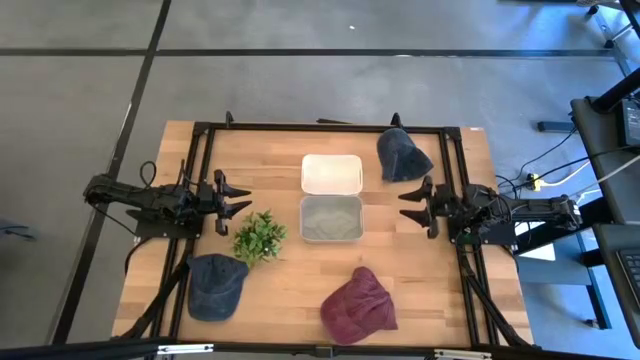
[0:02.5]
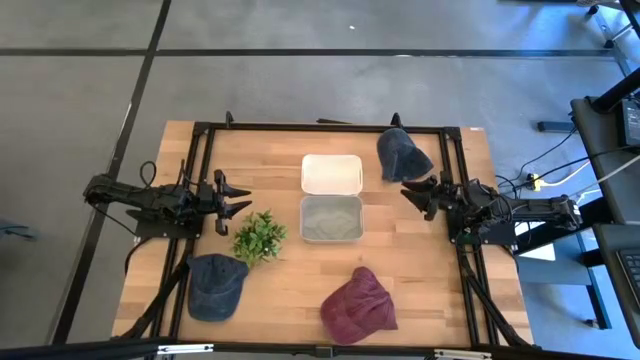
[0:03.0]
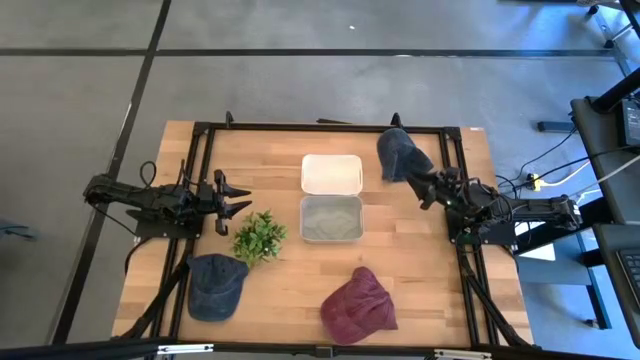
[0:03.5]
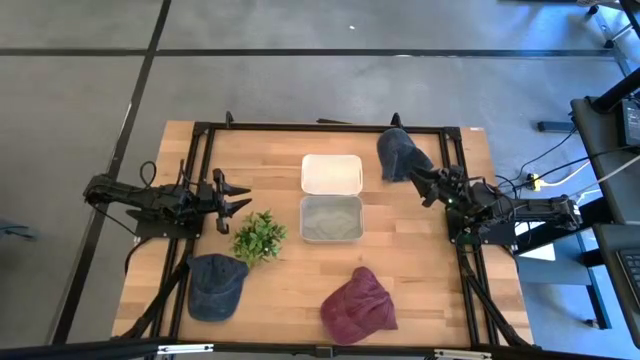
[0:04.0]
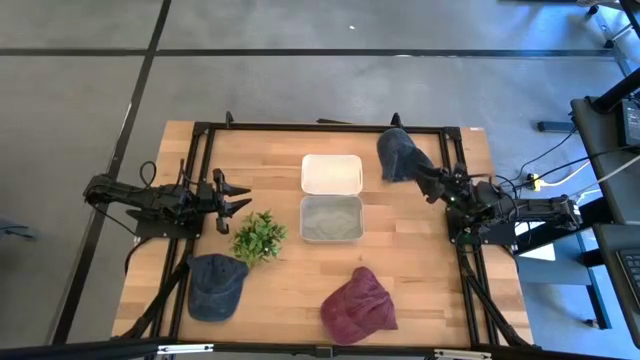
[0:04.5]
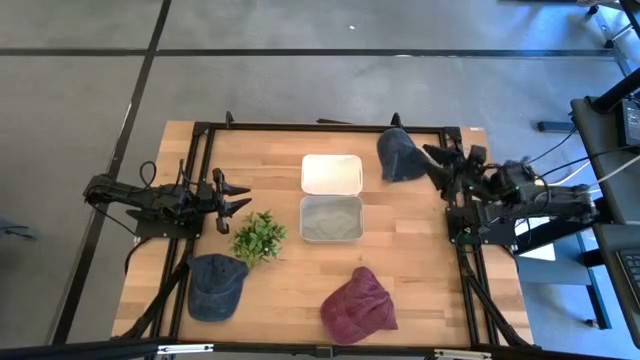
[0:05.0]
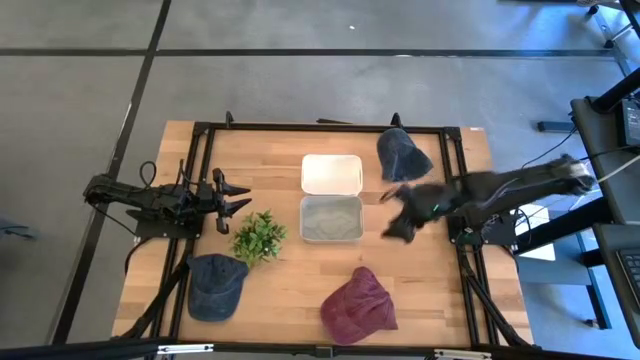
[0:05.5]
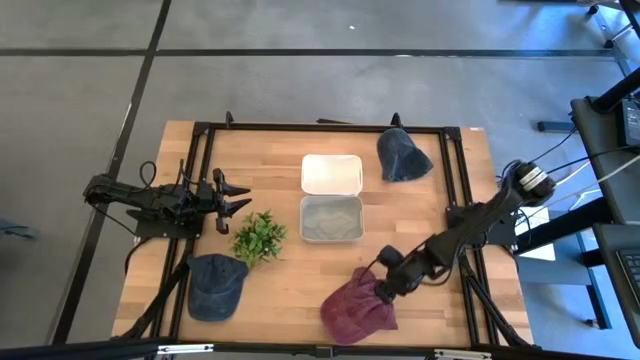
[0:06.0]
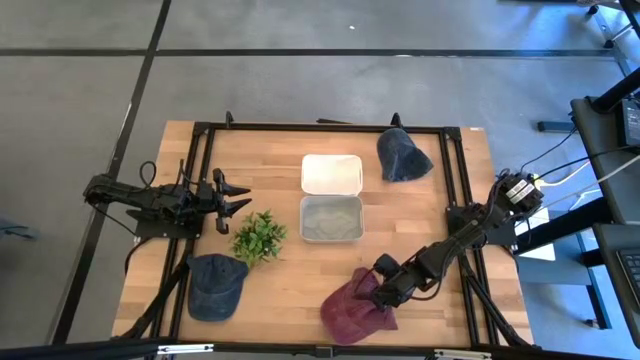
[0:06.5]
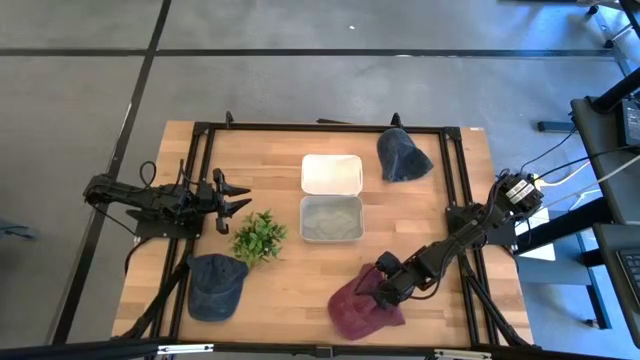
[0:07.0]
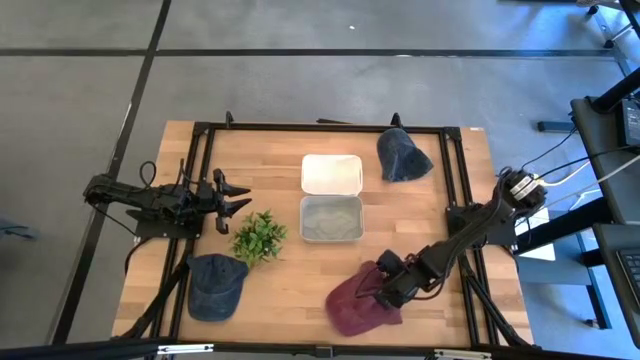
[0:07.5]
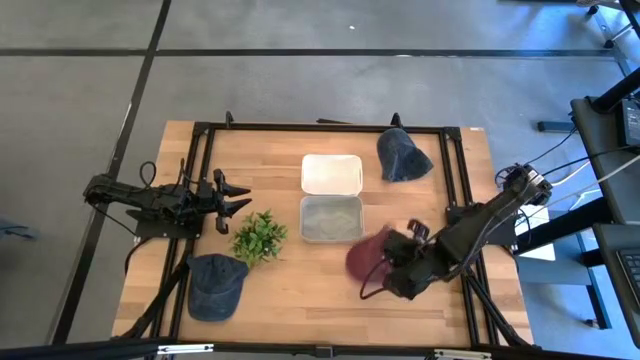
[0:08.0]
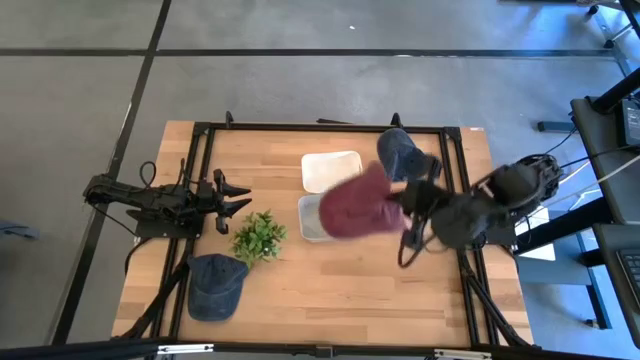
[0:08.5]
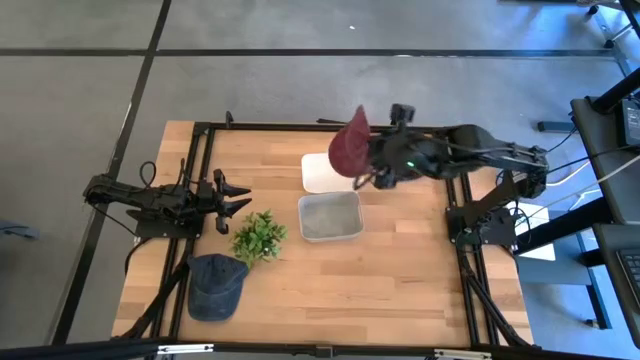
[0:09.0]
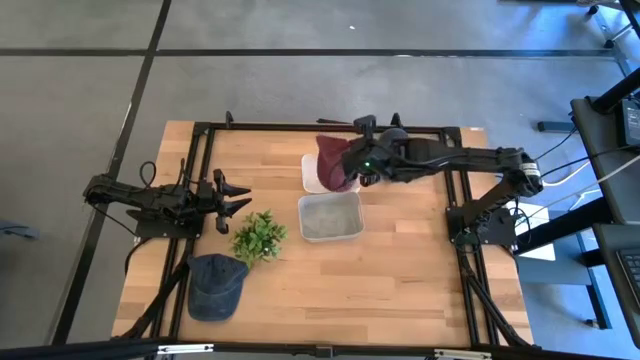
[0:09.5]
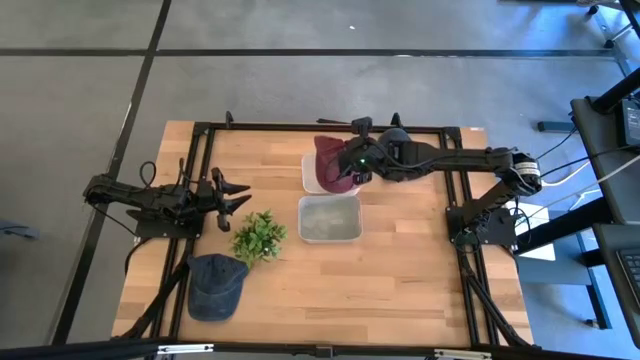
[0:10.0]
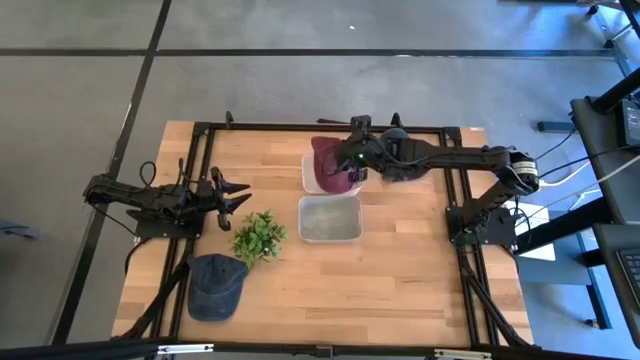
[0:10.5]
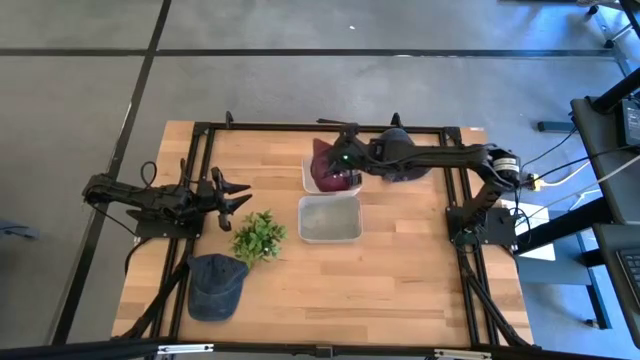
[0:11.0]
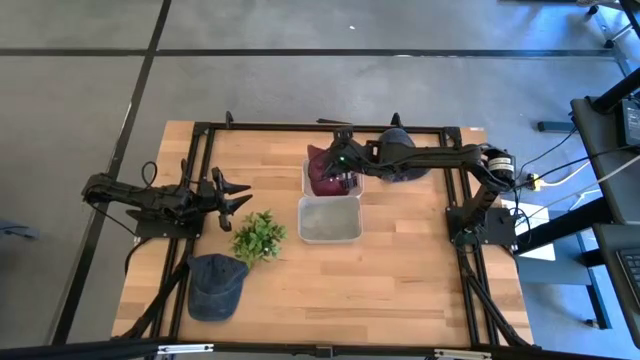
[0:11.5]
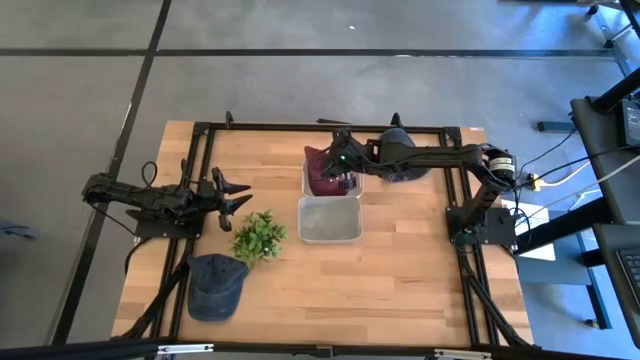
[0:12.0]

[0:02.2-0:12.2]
Task: Pick & Place hat
Put the red cap into the white bin

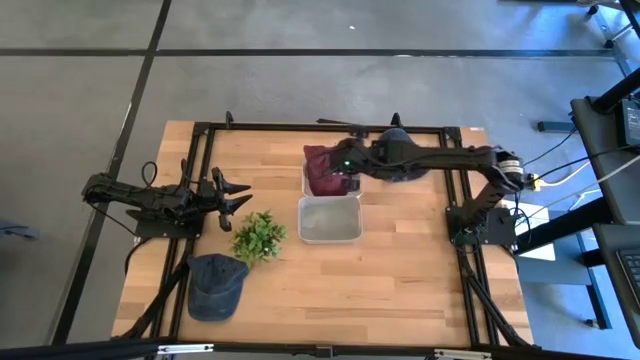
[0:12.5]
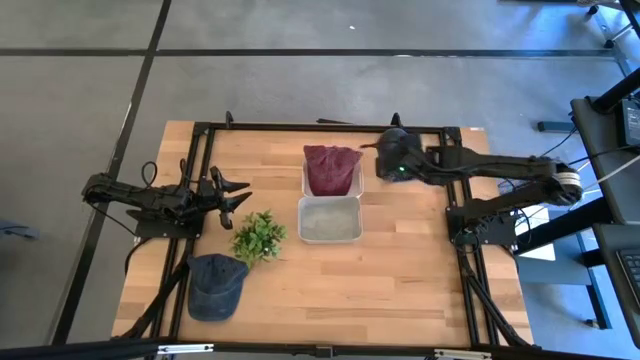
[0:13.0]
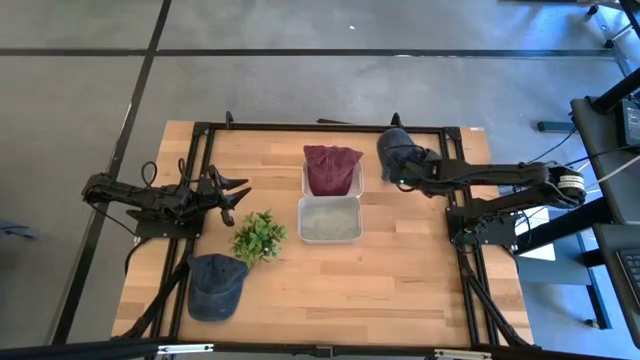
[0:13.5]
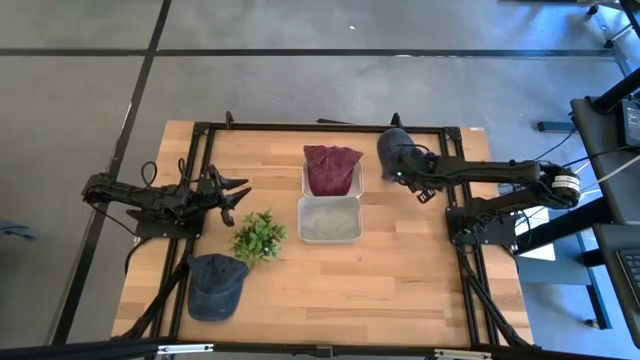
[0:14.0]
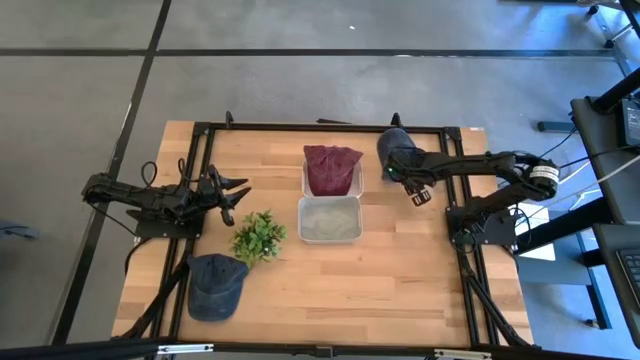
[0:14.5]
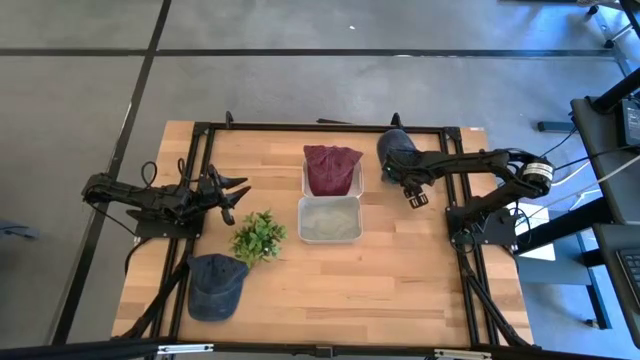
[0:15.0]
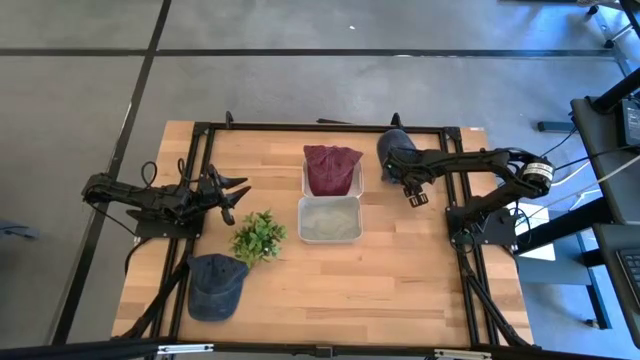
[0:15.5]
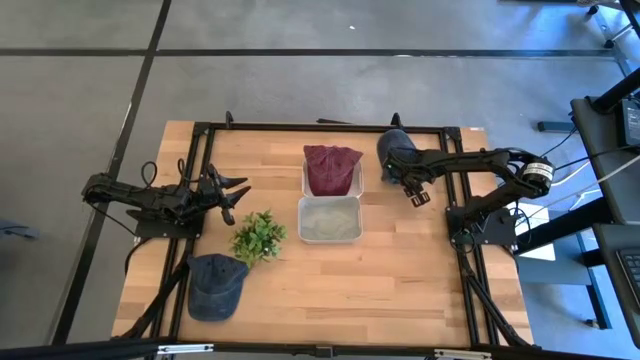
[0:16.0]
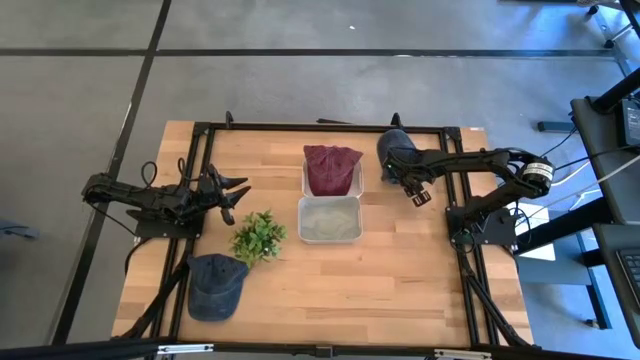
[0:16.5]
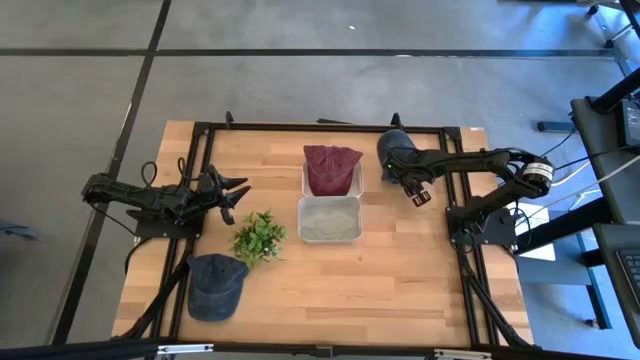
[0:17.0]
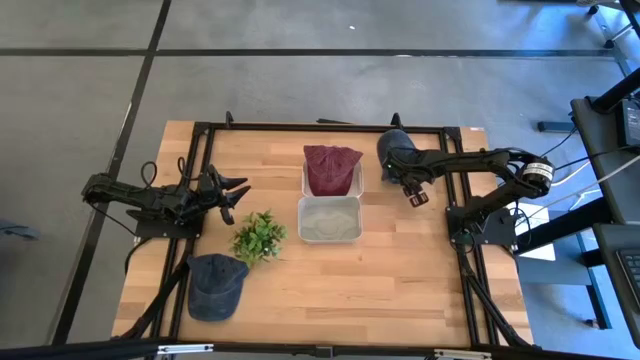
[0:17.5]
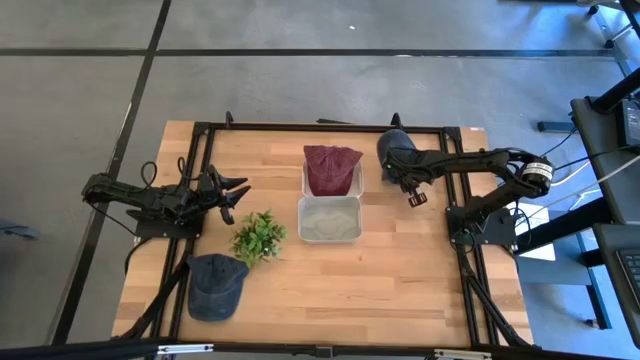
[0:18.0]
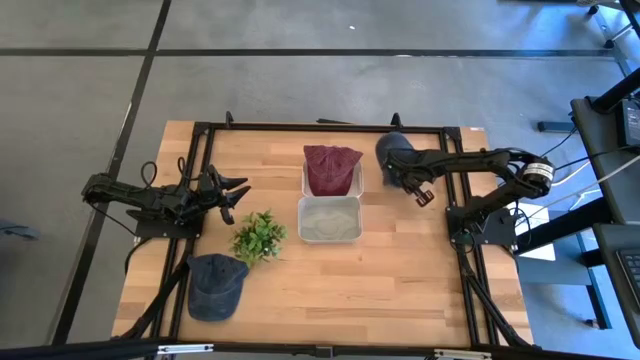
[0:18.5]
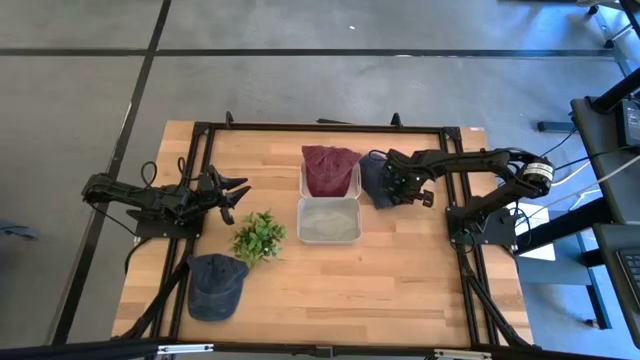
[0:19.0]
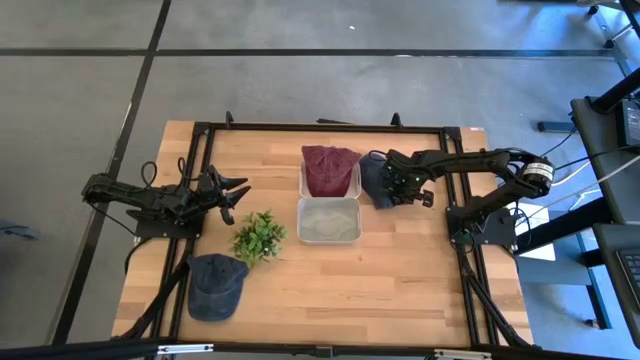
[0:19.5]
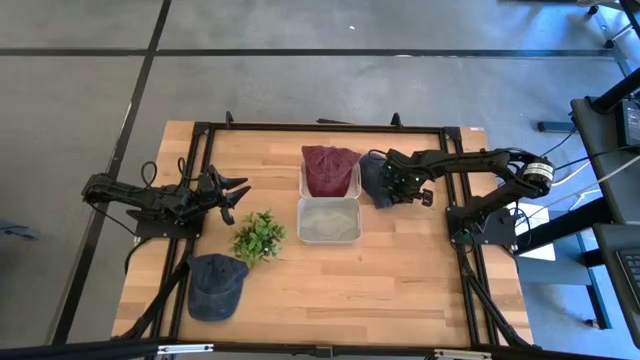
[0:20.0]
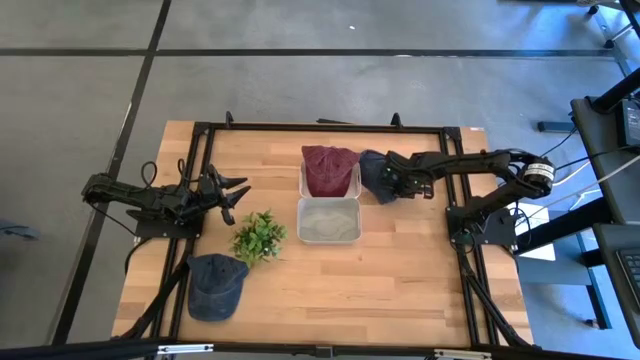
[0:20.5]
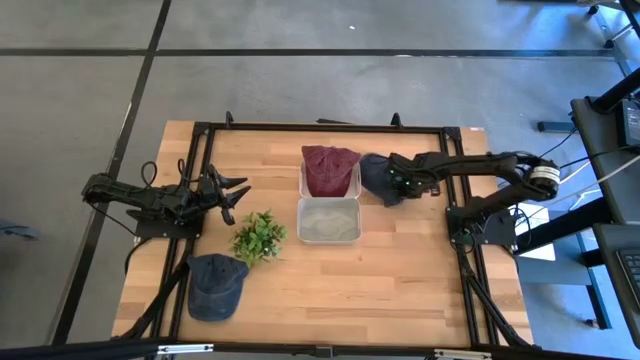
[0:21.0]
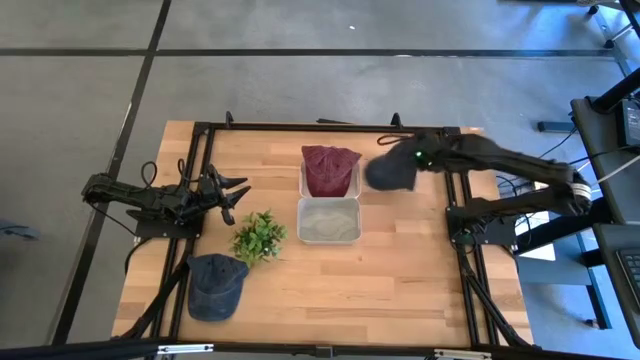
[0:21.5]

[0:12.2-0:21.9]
Put the blue cap into the gray bin
